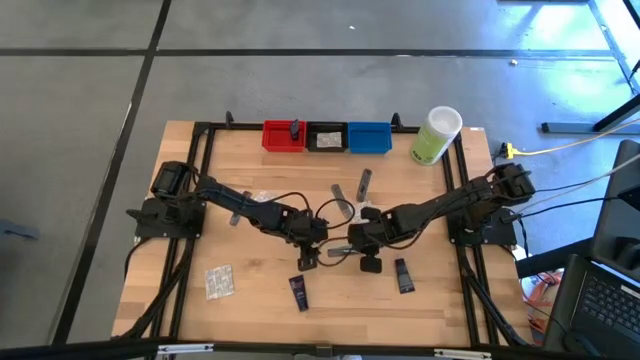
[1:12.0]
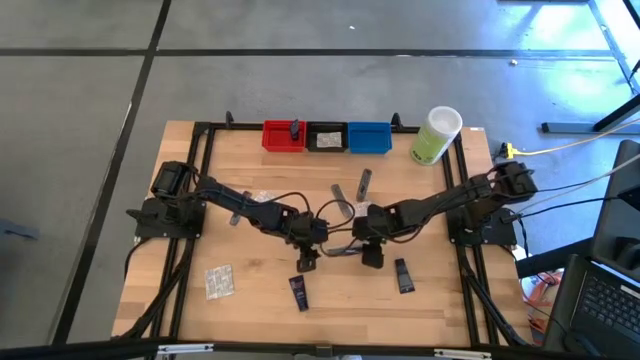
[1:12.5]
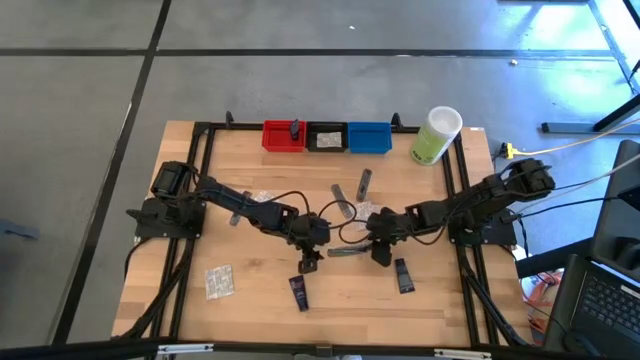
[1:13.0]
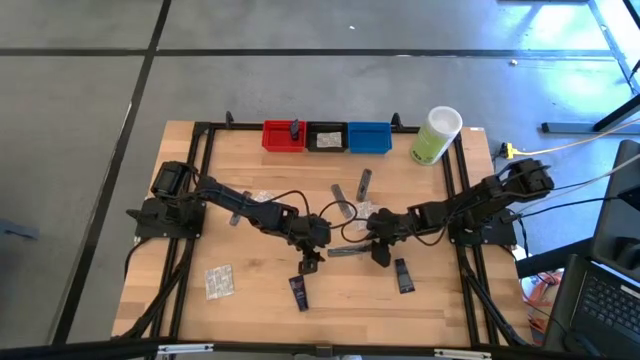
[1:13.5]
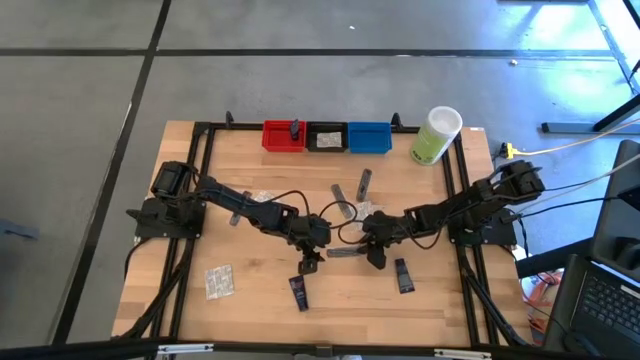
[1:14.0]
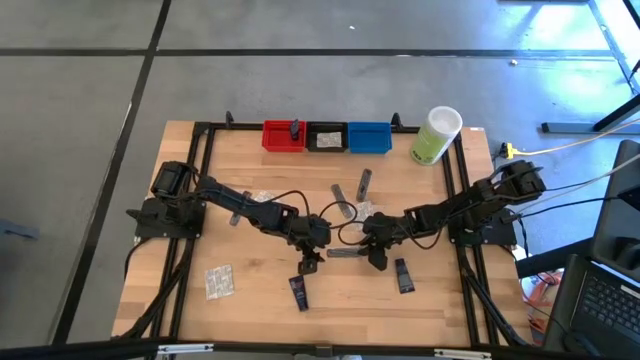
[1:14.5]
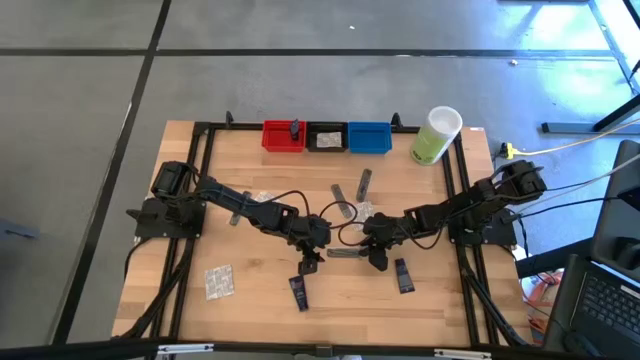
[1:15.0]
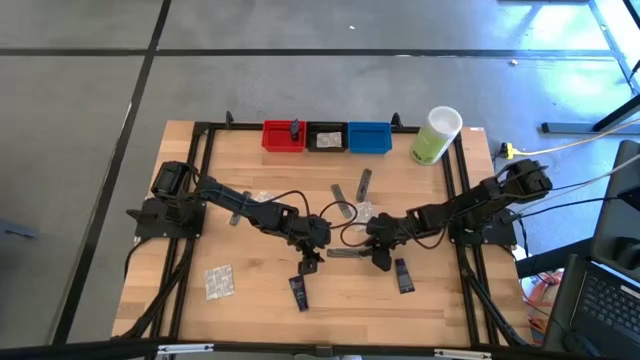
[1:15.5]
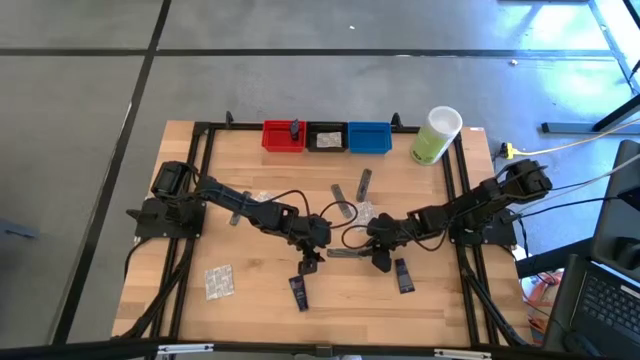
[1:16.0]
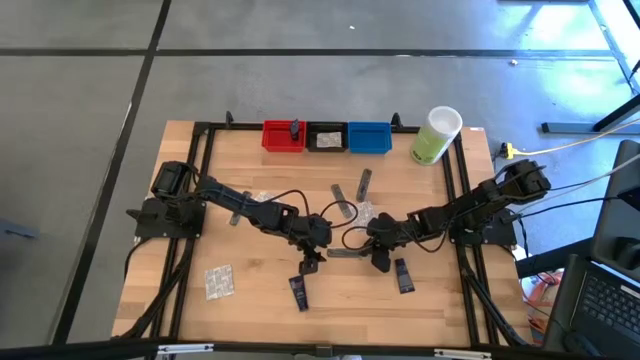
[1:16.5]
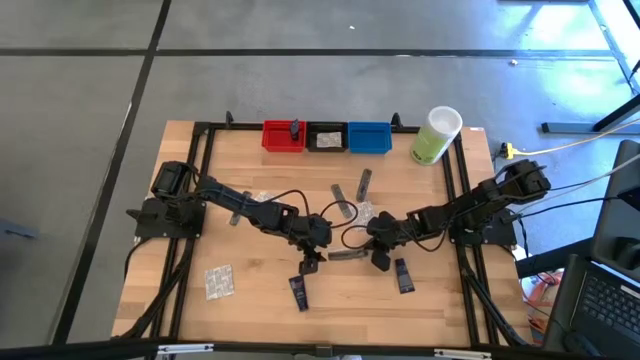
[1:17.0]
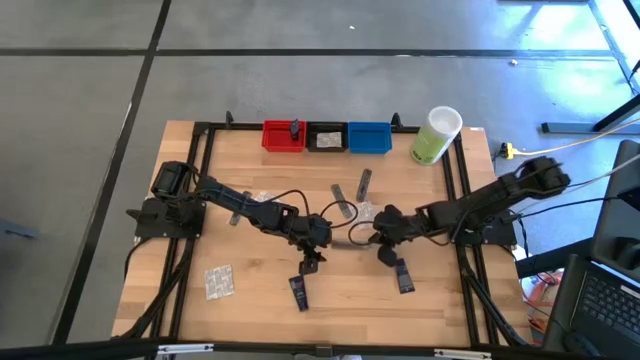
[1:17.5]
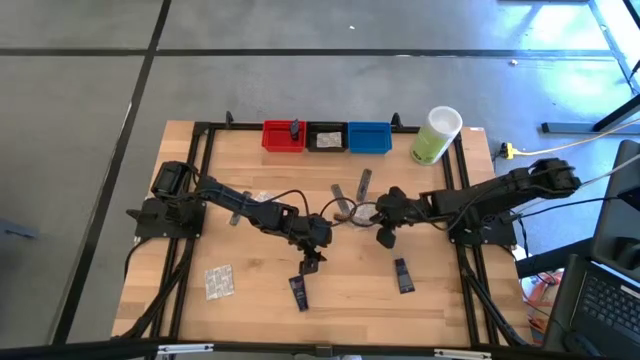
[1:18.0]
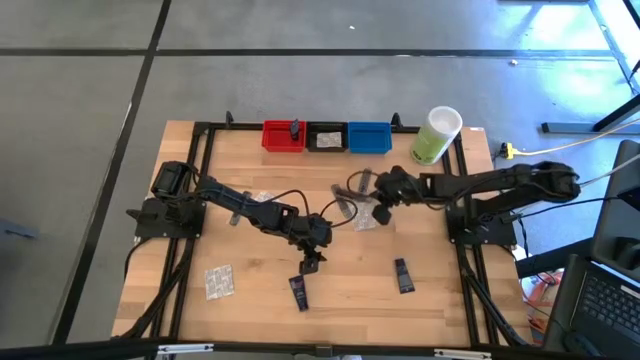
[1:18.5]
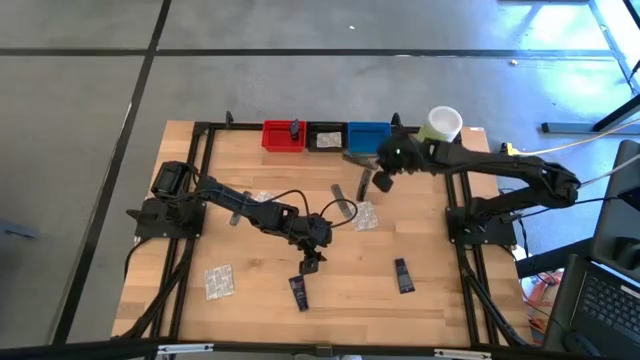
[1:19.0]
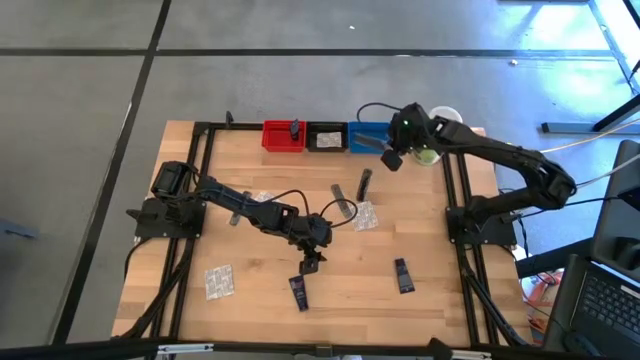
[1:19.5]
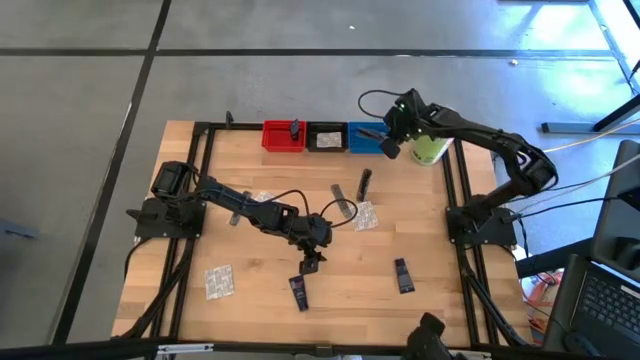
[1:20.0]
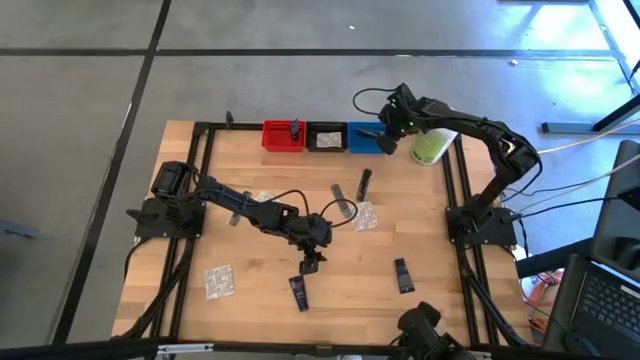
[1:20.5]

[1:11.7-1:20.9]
Task: Pick & Place Travel size toiletries
Put the black comb into the blue bin

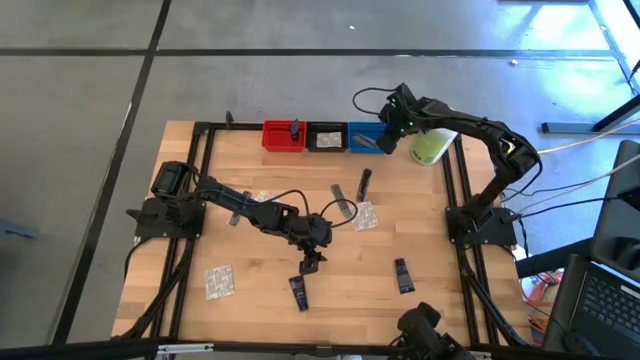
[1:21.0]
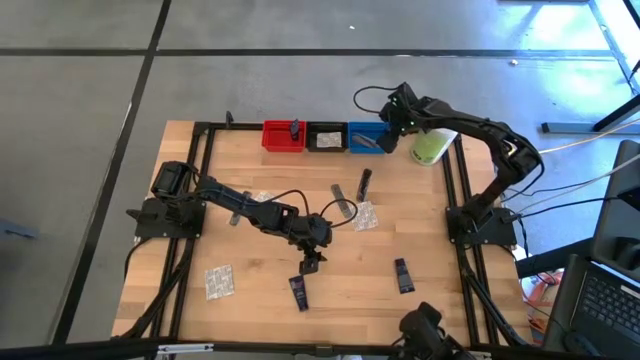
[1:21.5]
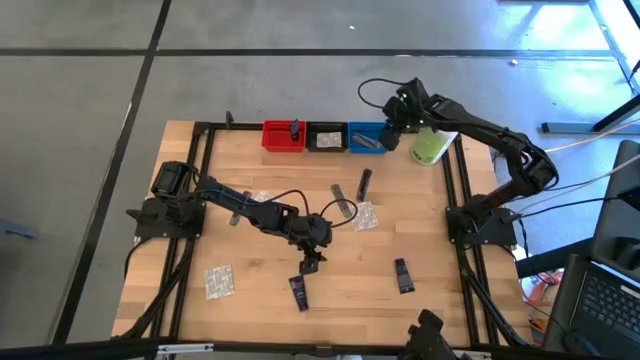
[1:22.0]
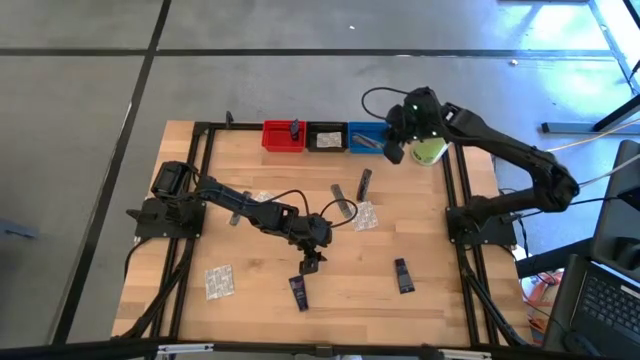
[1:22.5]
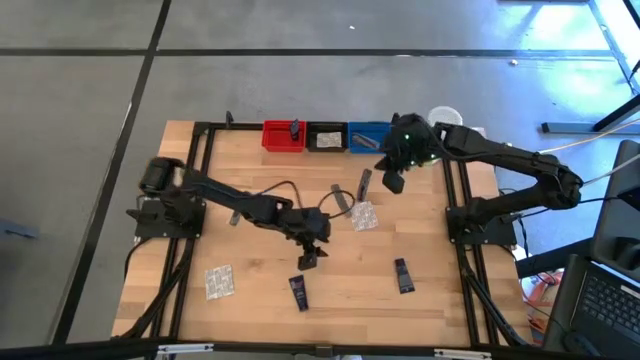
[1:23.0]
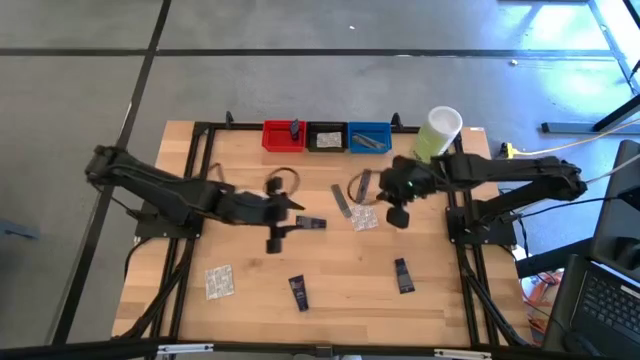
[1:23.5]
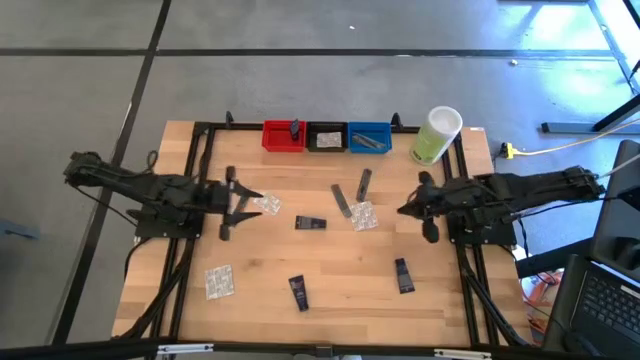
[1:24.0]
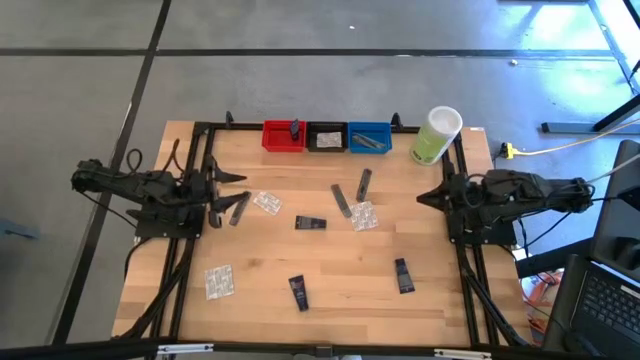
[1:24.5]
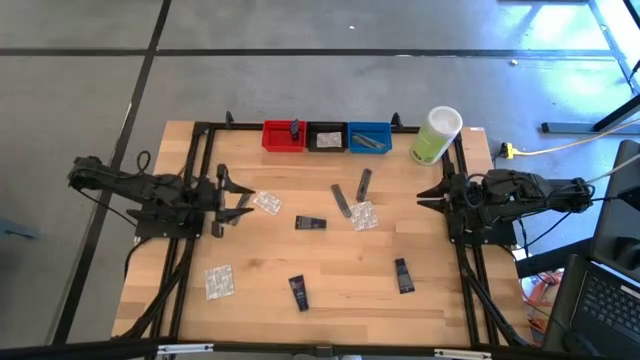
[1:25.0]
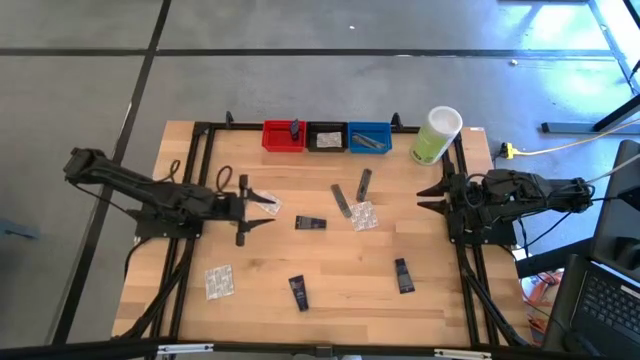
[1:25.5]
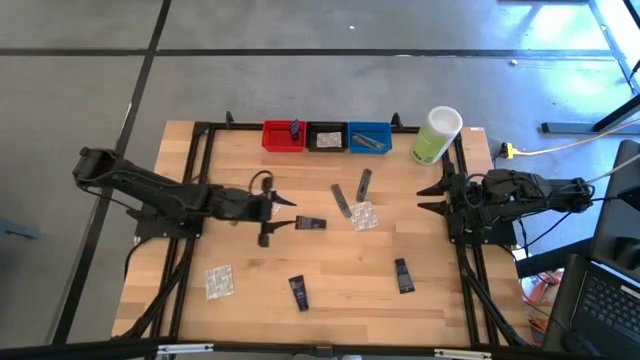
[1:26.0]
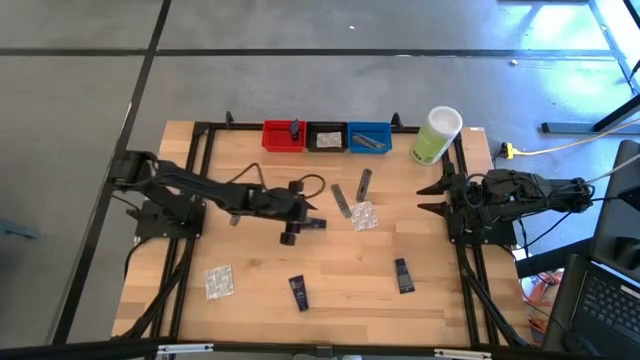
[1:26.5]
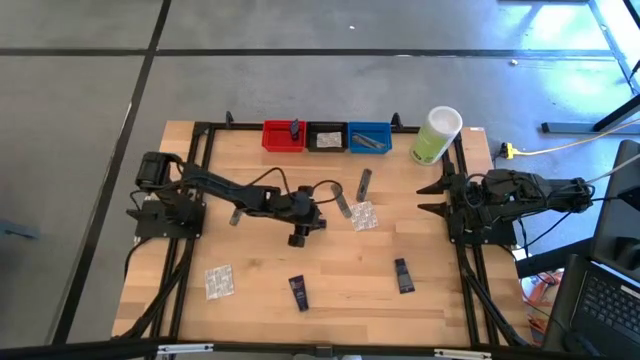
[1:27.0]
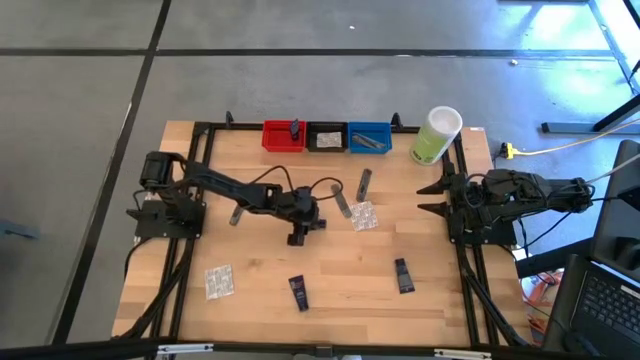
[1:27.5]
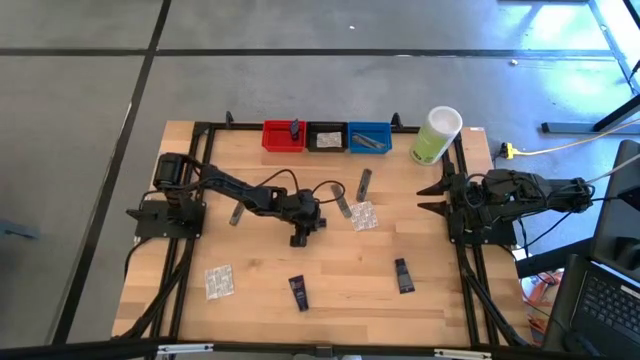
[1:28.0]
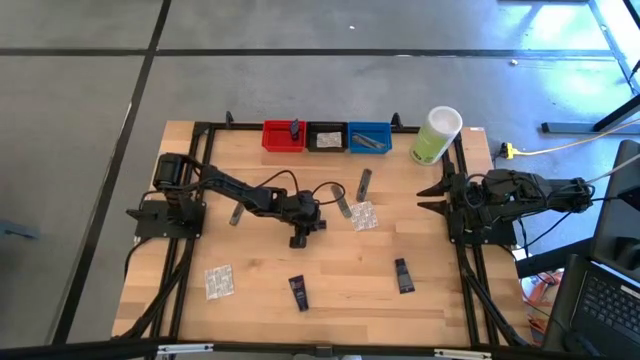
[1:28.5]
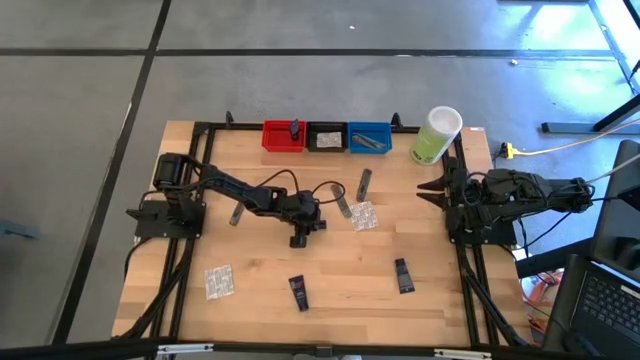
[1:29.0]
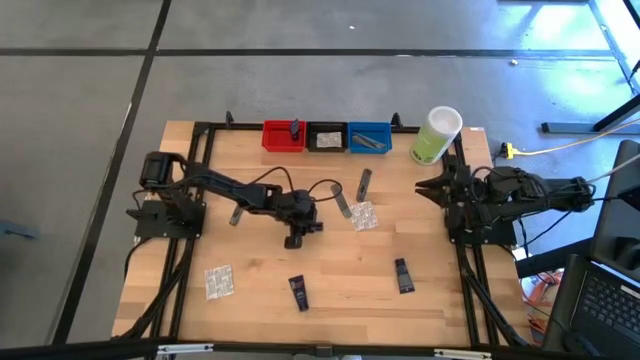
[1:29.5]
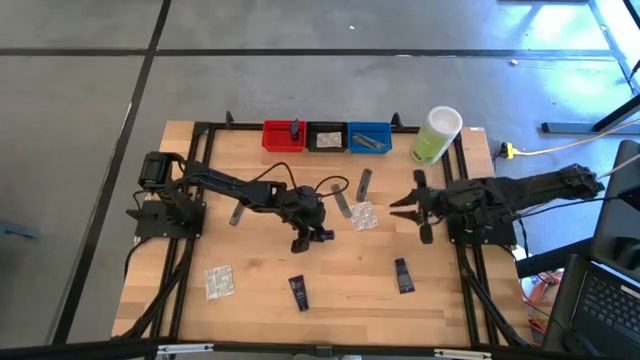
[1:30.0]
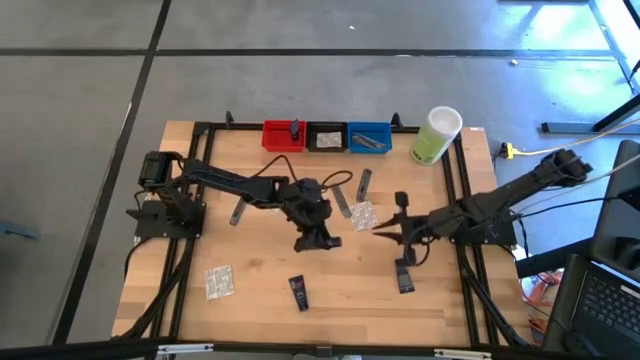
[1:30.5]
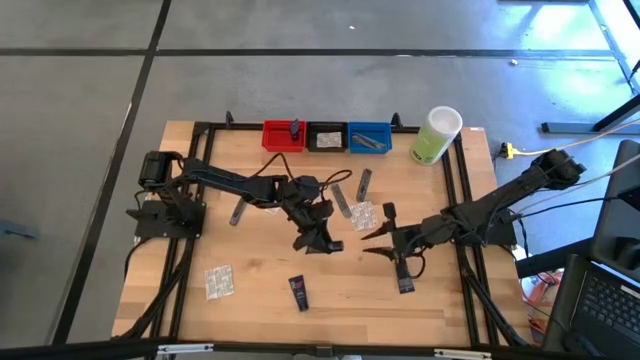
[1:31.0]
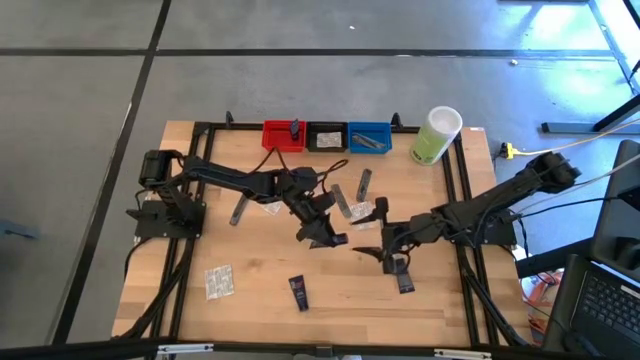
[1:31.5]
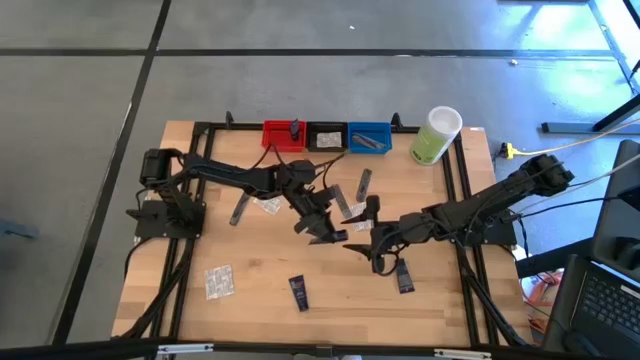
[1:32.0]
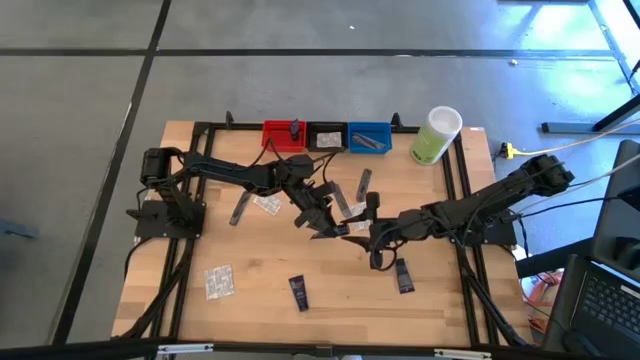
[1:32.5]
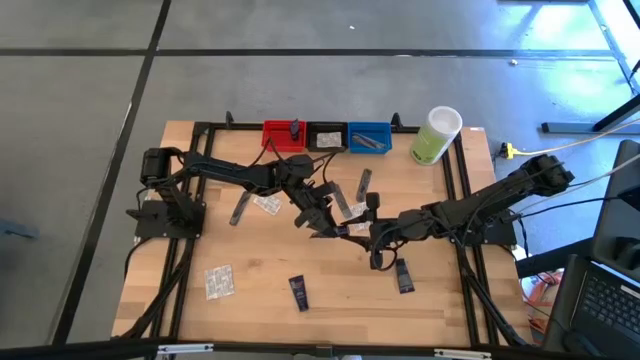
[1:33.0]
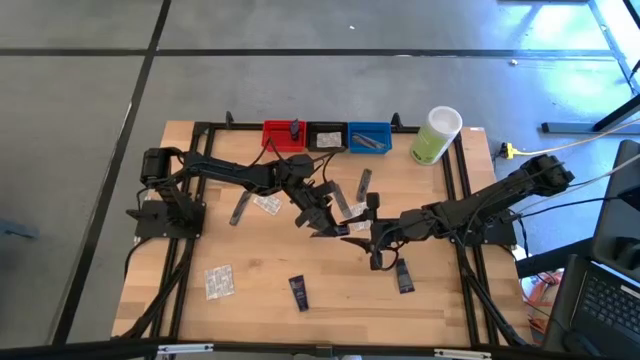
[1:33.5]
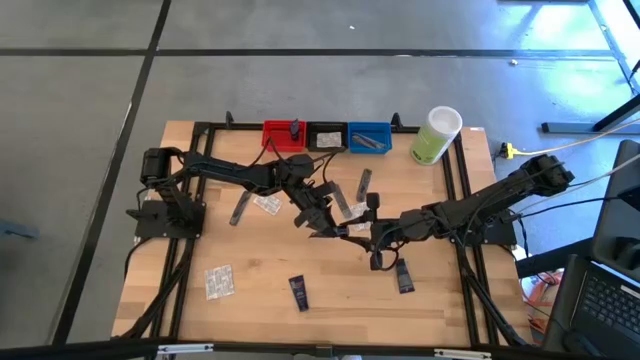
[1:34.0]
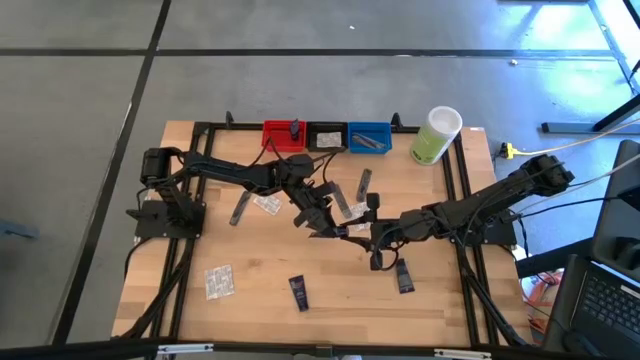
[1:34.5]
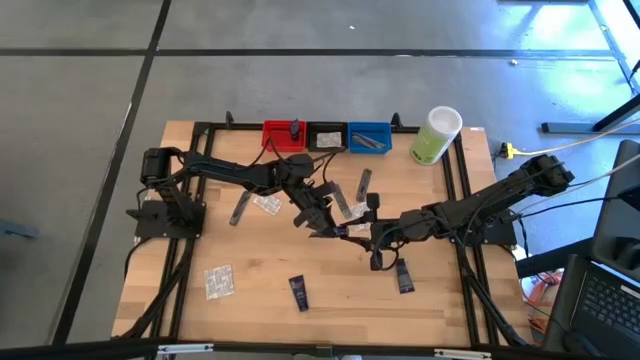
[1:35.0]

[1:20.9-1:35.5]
Put the blue shave cream into the red bin
